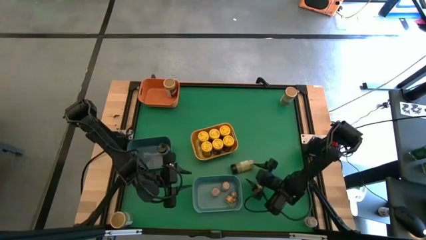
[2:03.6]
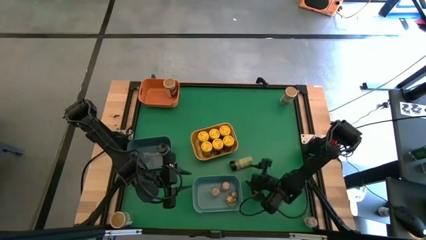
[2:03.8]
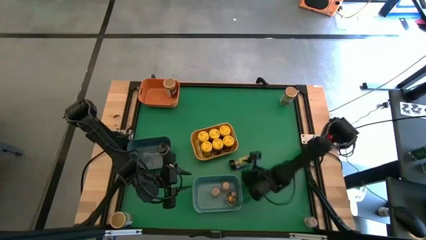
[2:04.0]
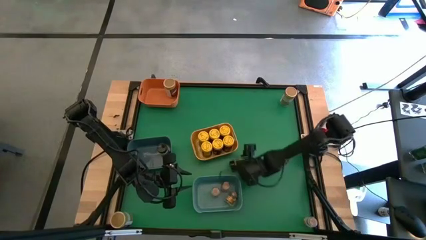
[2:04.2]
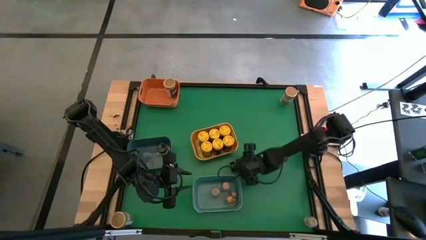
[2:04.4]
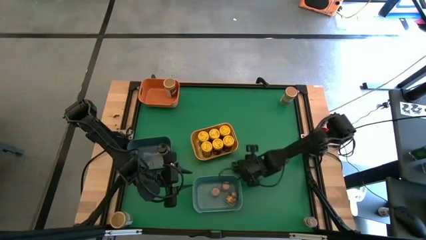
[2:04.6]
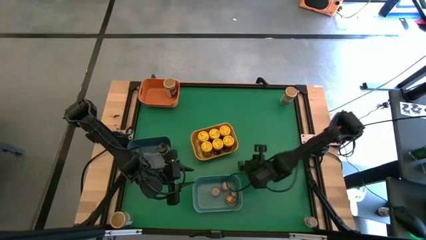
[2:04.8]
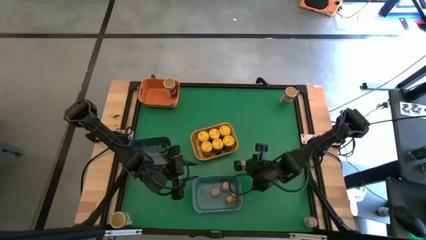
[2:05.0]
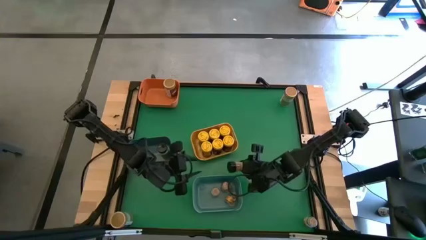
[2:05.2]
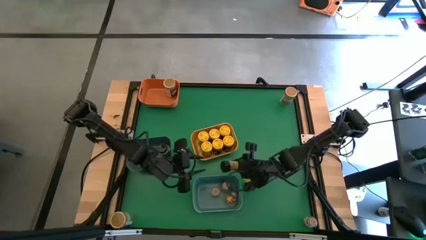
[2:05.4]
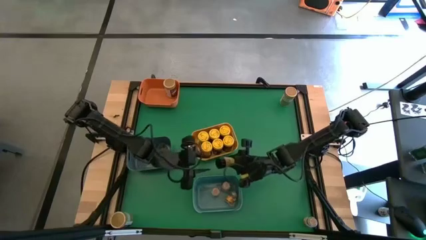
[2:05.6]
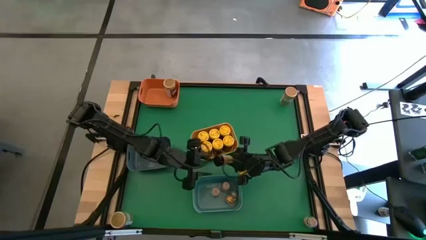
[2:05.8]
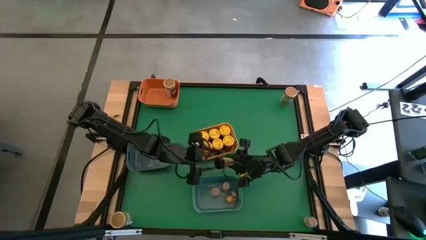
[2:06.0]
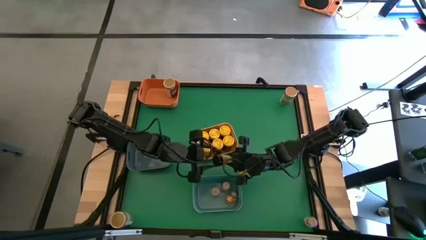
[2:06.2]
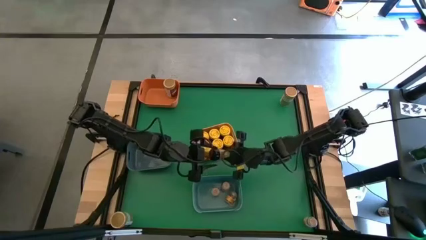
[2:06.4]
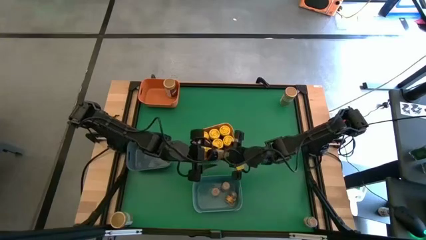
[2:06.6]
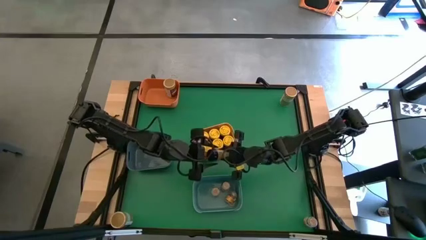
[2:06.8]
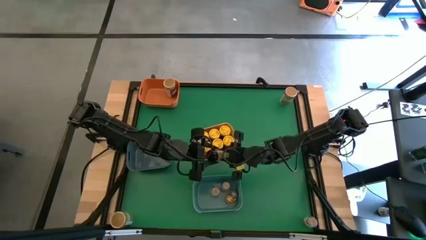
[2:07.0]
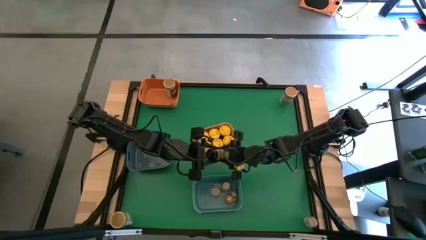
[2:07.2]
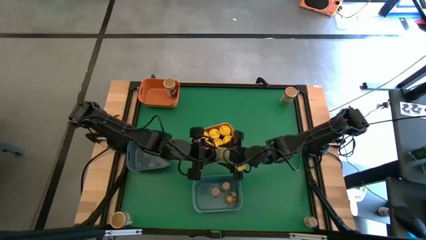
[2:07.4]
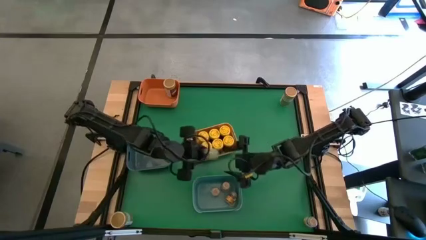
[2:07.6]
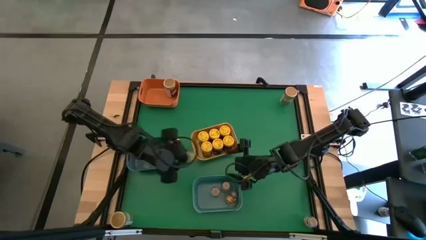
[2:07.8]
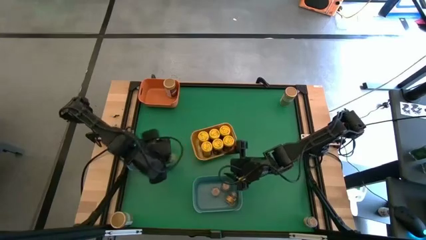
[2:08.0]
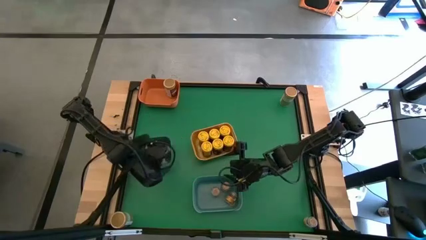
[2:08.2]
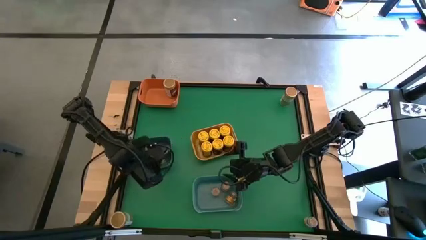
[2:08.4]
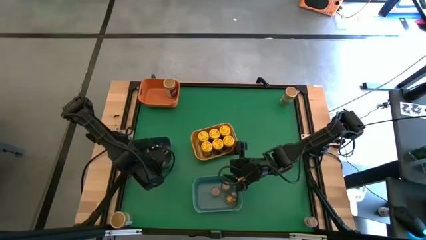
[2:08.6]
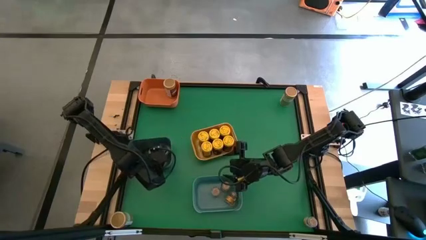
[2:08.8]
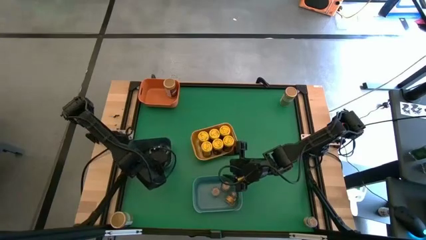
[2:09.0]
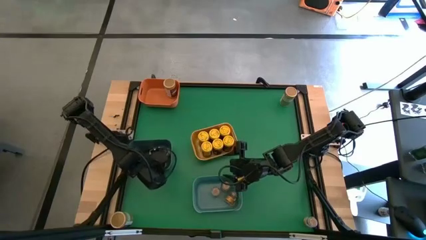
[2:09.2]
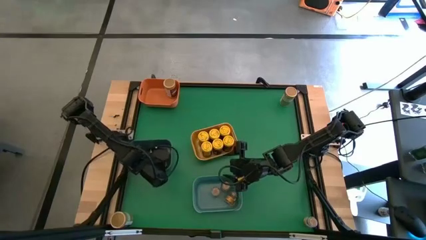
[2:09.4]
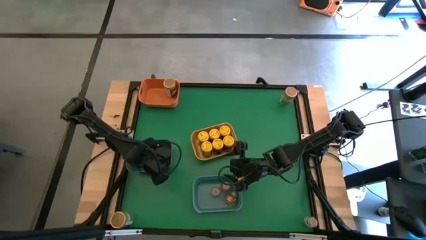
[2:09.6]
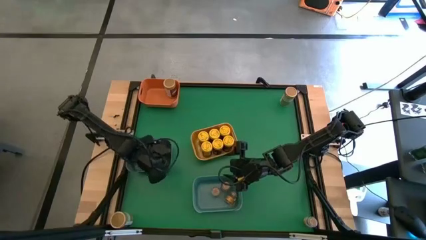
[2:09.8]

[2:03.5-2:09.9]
Task: Sort spices by type
Put the black seasoning bottle into the blue bin

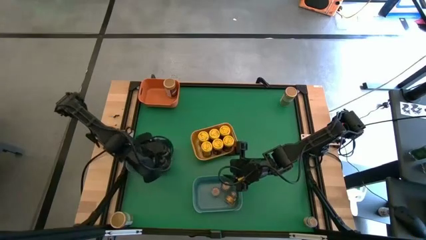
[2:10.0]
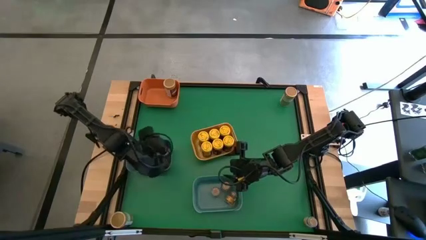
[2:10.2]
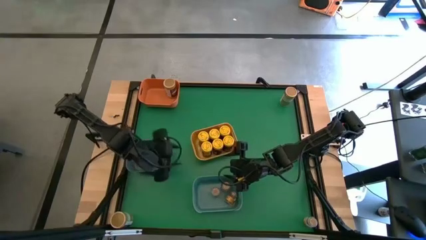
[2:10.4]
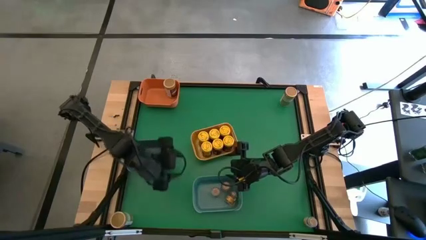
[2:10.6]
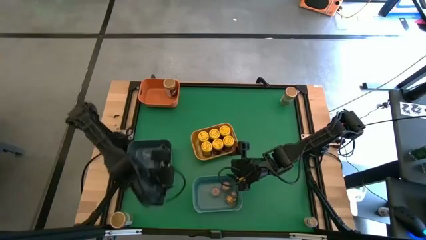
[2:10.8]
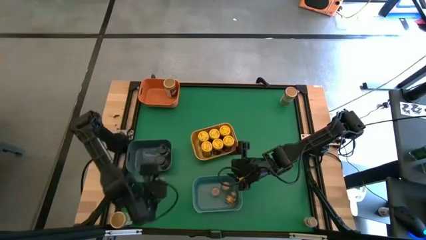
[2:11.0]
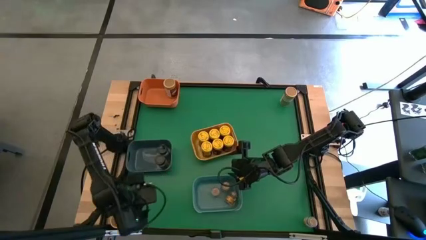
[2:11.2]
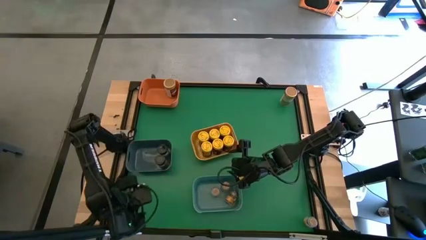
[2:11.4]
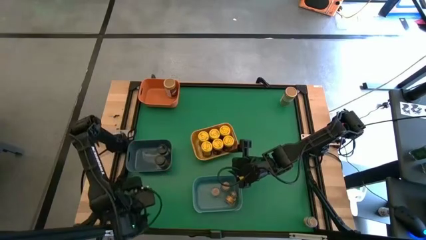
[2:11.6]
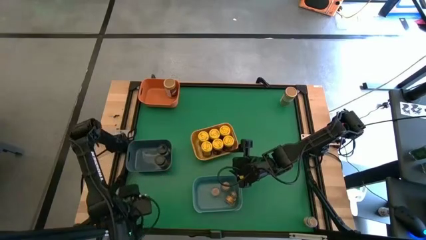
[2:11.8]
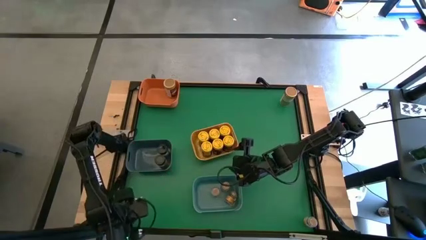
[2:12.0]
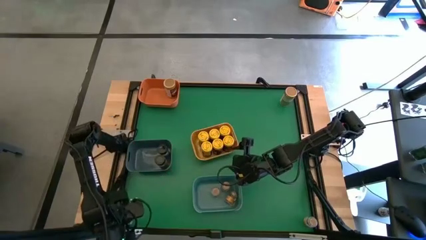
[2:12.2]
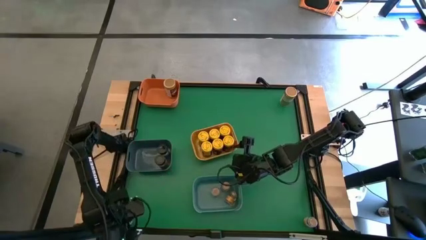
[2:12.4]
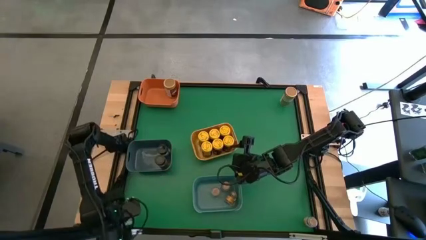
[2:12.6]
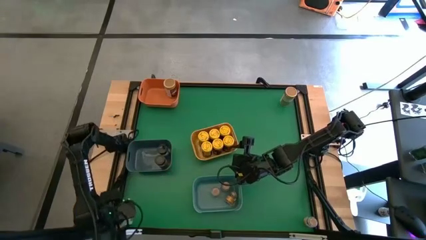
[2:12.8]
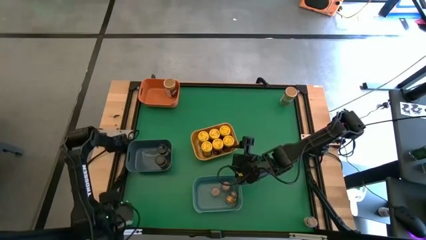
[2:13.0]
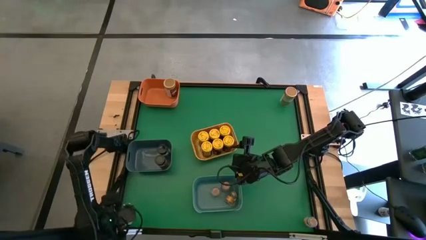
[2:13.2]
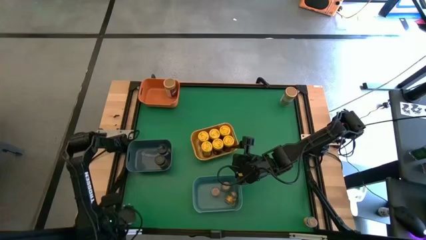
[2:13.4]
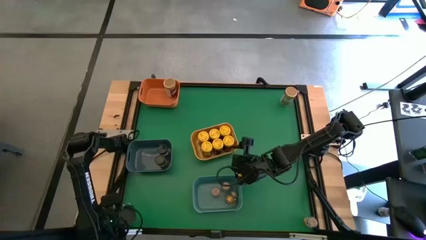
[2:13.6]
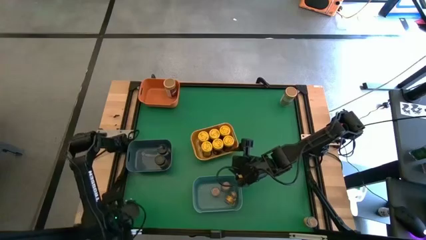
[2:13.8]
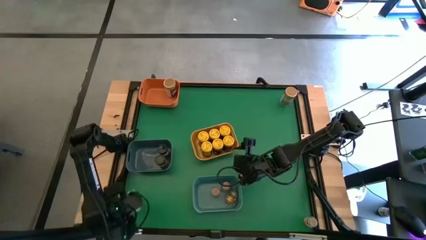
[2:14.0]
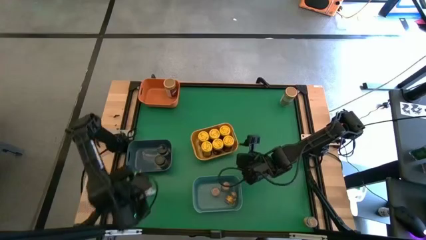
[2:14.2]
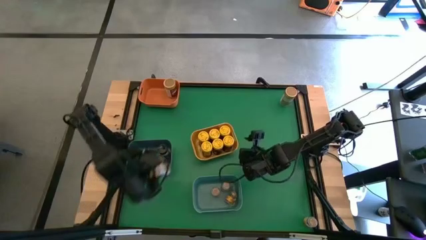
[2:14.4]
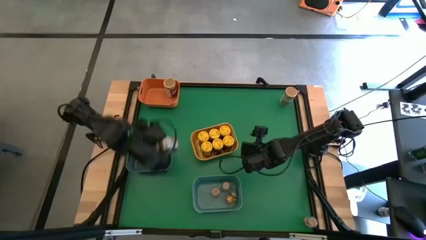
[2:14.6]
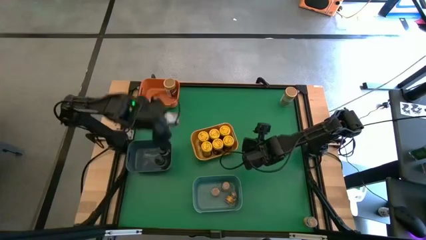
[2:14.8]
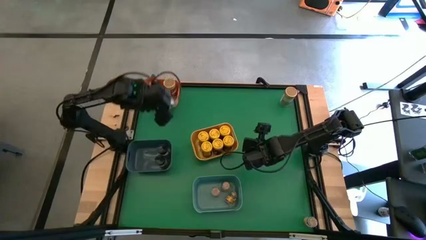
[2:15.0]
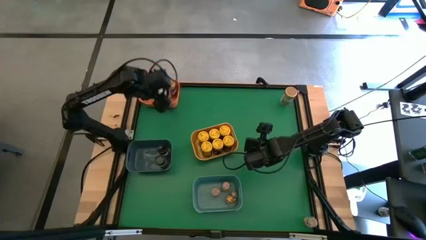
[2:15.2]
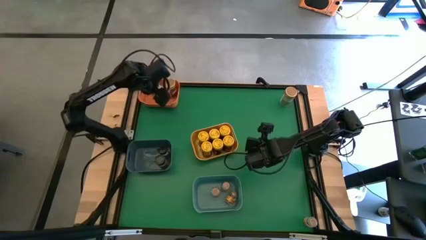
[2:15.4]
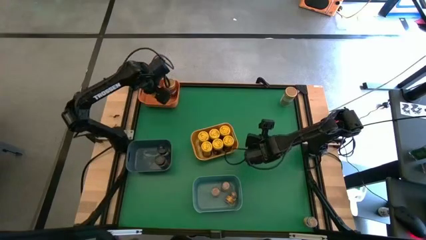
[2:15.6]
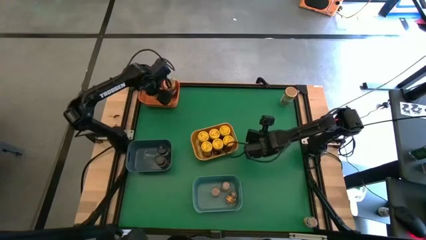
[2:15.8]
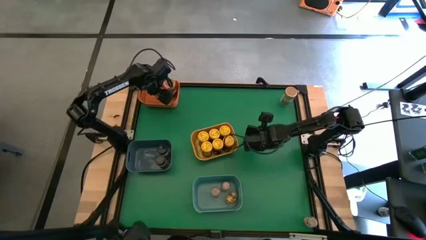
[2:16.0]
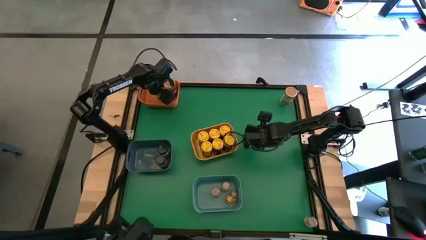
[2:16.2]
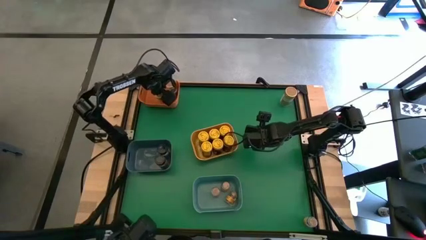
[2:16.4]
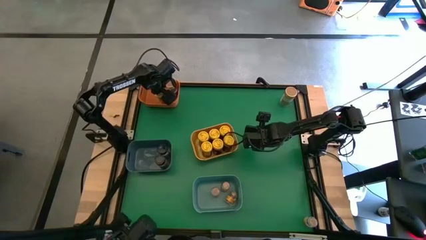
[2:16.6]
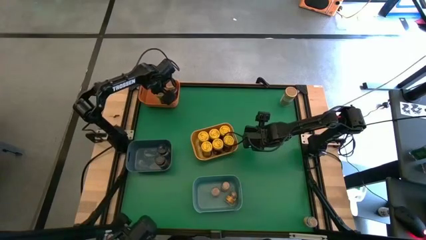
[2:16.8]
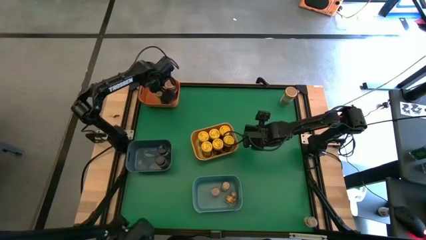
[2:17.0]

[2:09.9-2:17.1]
Put the brown seasoning bottle into the orange bin

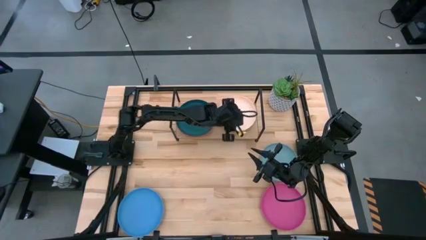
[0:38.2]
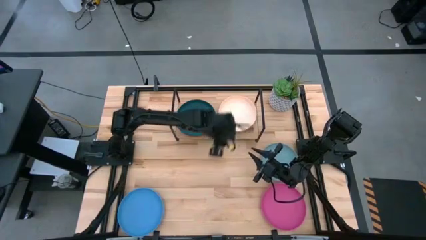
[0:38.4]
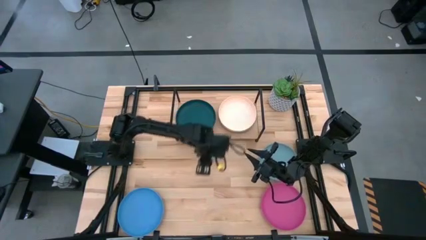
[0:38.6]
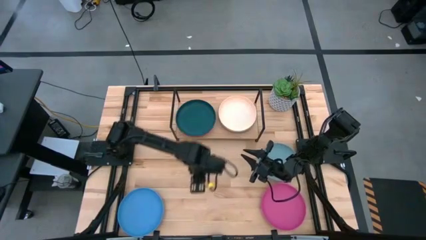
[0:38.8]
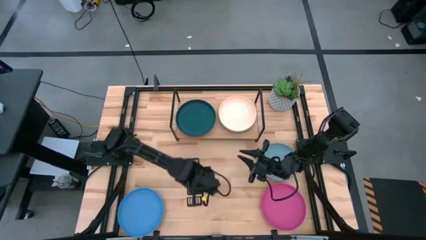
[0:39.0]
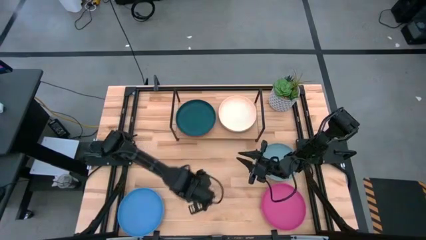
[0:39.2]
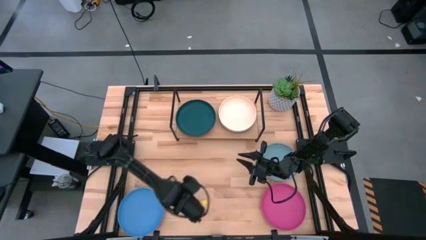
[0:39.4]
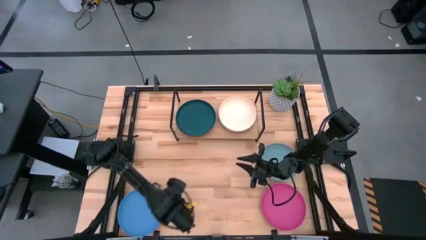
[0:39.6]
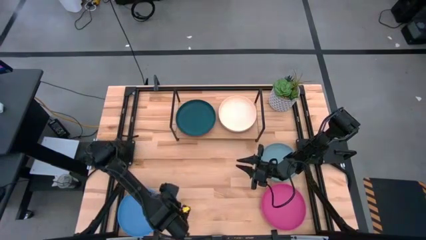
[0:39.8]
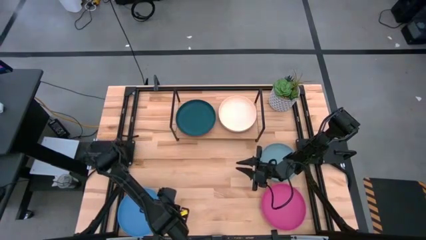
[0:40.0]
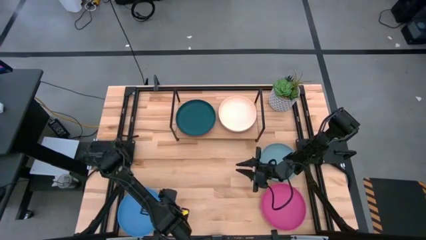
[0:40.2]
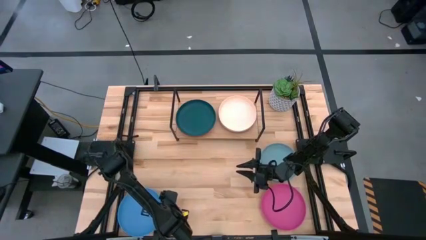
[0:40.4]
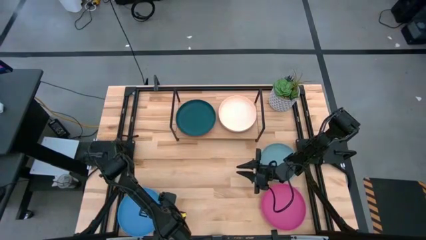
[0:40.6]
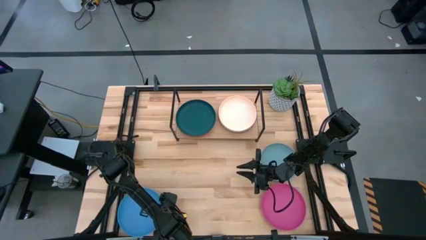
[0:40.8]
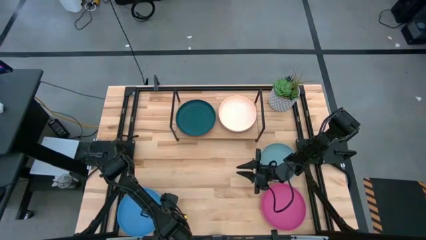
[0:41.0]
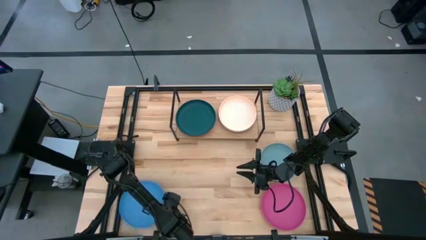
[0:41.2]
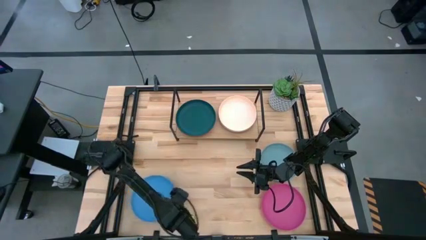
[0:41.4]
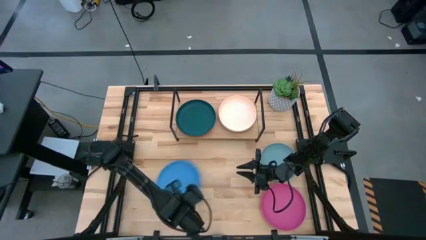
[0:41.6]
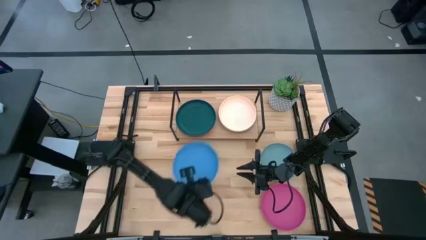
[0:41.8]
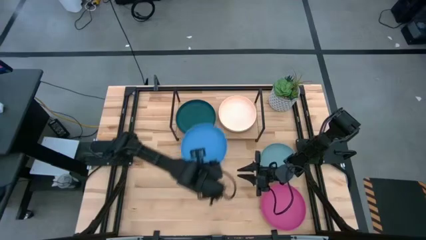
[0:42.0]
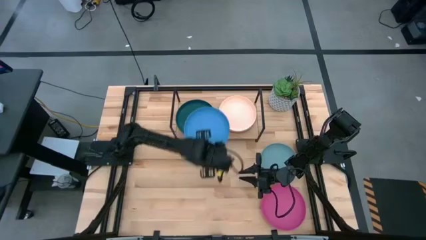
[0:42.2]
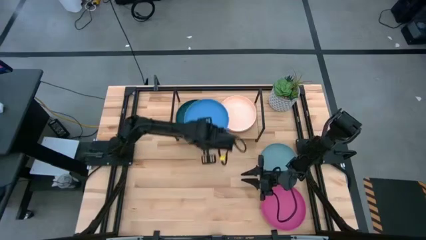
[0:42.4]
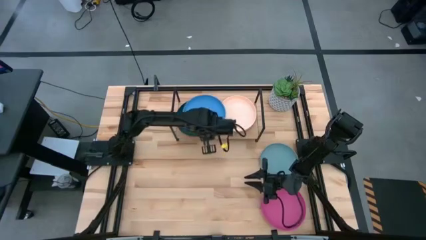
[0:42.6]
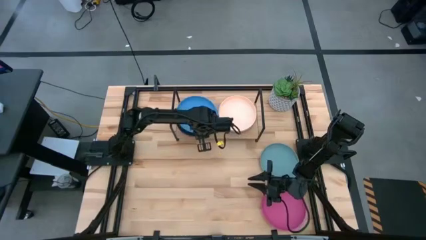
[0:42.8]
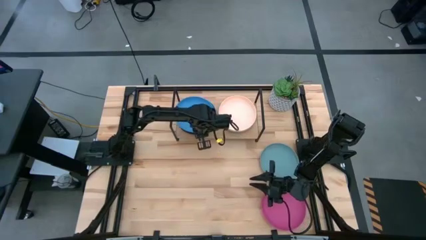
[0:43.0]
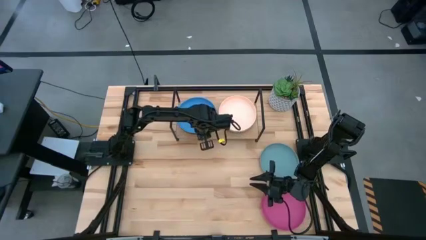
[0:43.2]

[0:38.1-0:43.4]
Task: Place and stack plates onto a shelf
Stack the blue plate on top of the dark blue plate on the shelf
